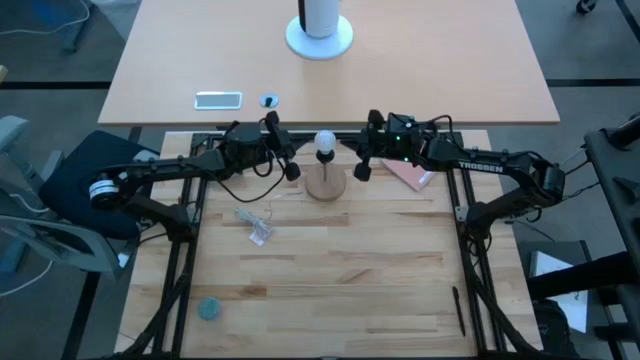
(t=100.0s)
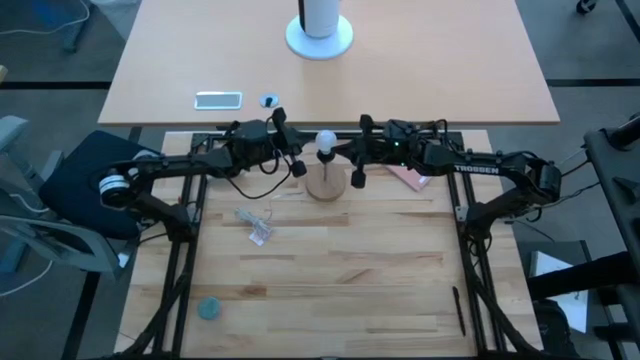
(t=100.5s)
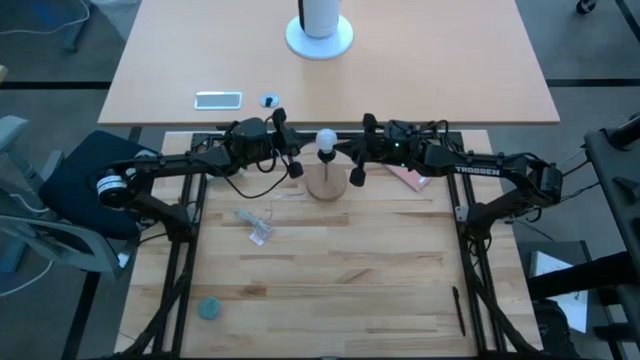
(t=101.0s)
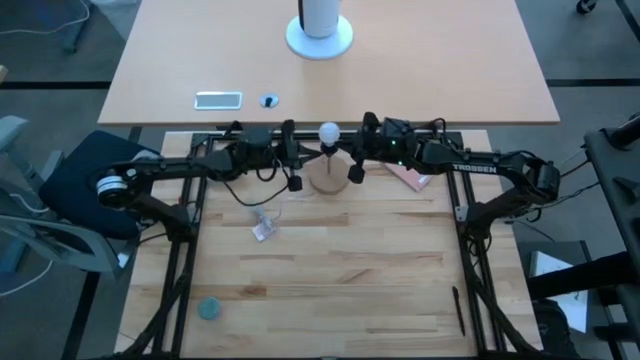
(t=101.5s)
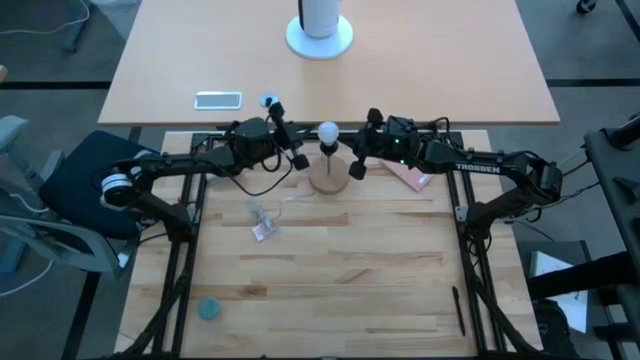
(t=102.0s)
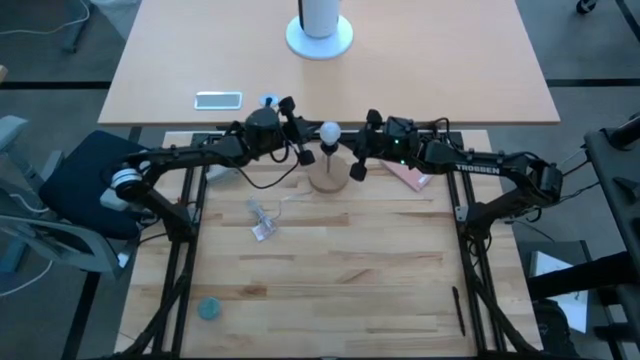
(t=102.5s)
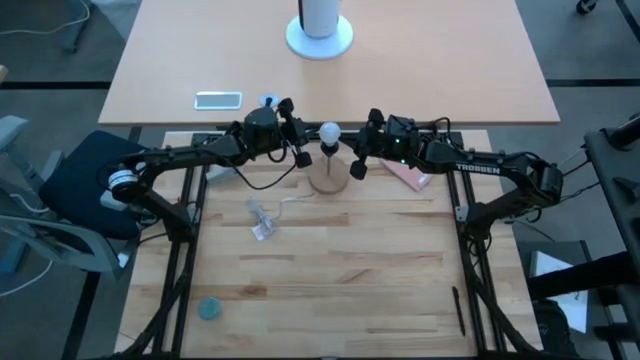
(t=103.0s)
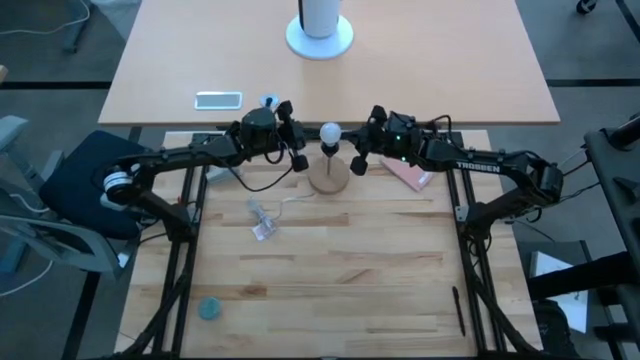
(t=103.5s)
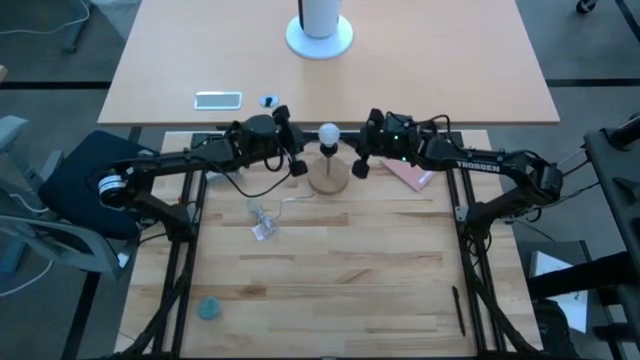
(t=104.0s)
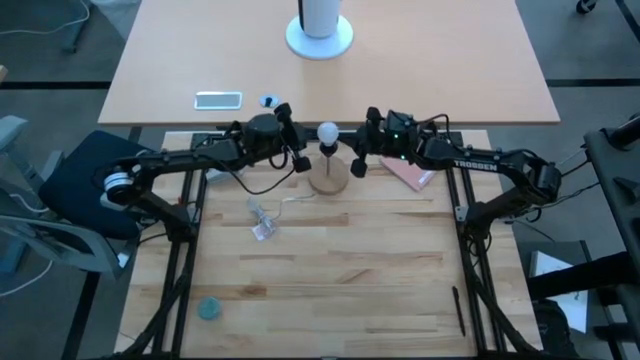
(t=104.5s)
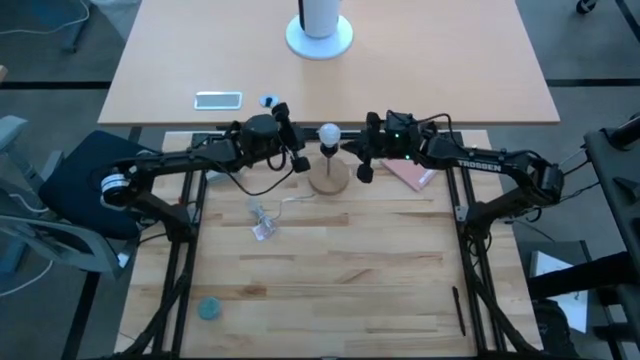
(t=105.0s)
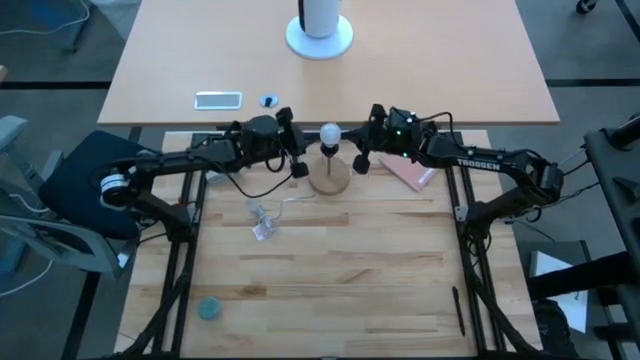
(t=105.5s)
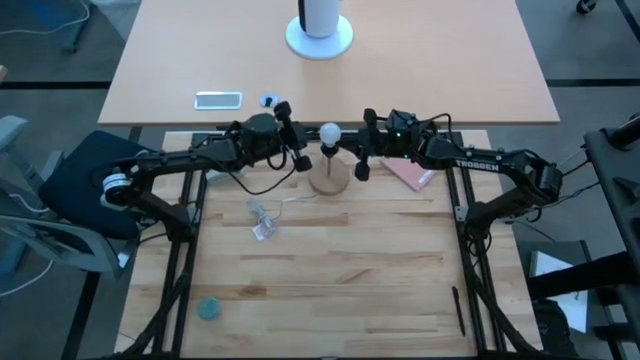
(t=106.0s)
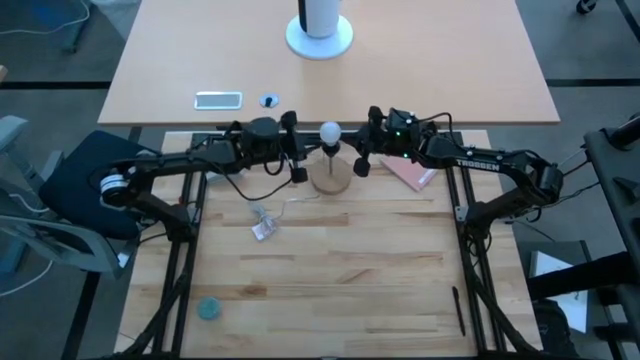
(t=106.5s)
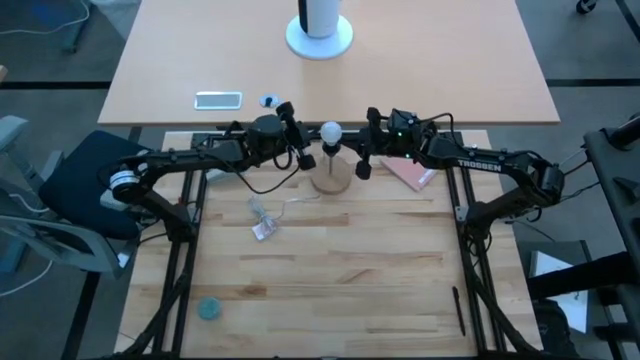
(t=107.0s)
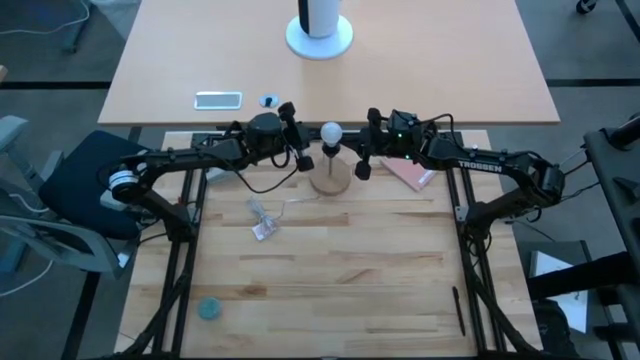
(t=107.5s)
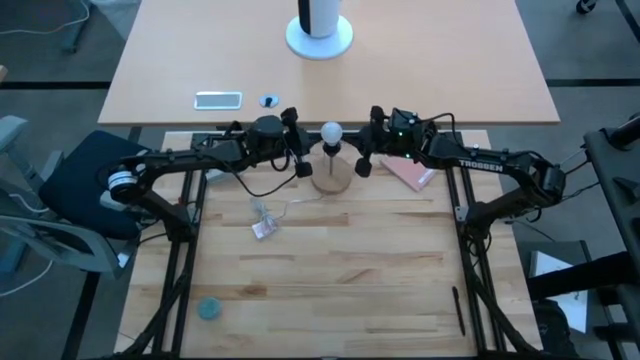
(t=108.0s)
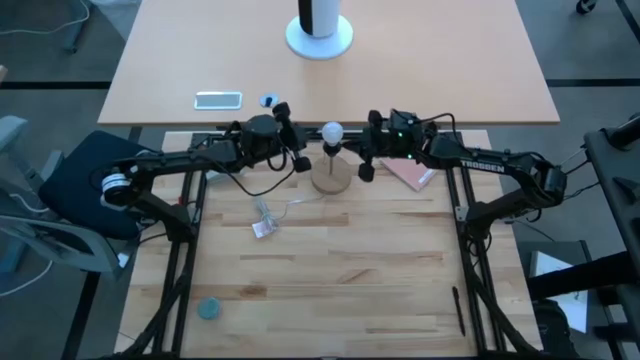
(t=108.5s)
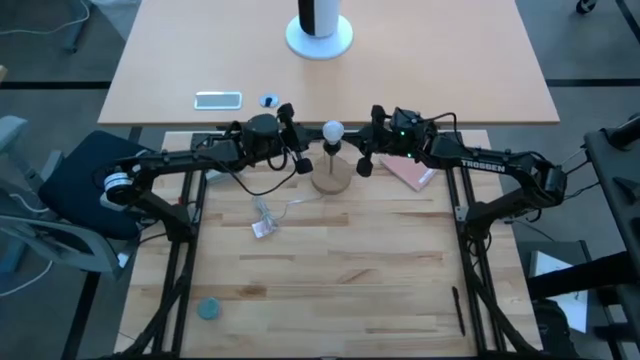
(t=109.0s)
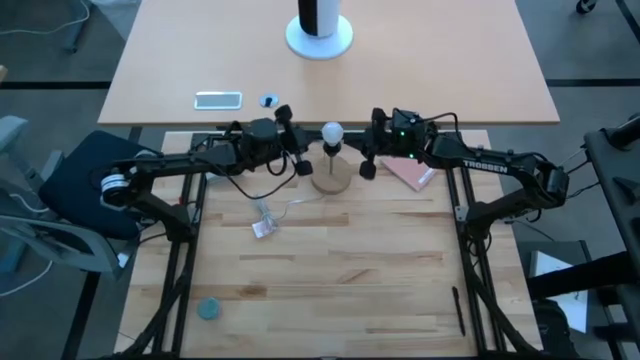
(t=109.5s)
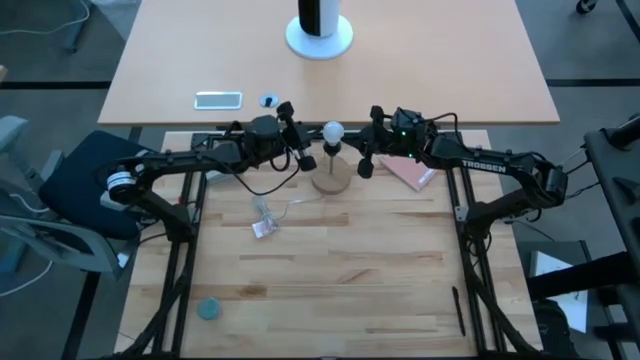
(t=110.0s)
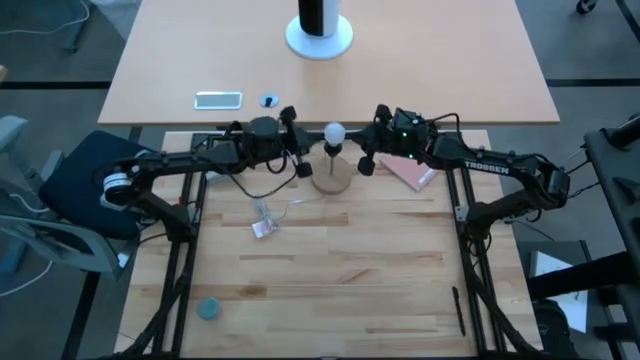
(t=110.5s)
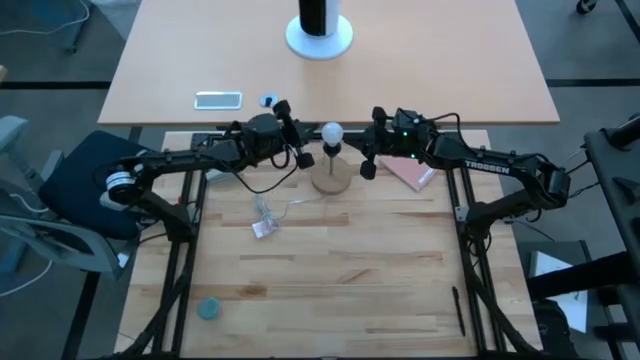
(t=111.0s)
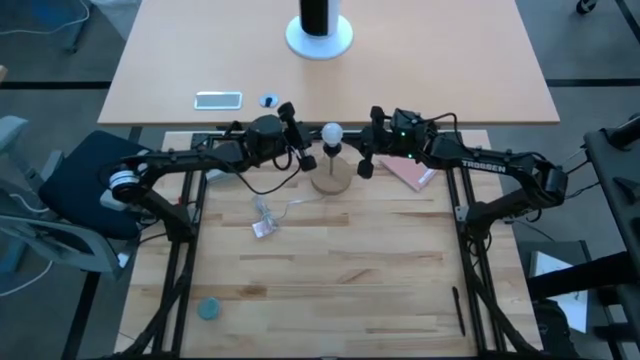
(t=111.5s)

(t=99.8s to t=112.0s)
Task: Screw lightbulb
Remove the lightbulb from the desk lamp

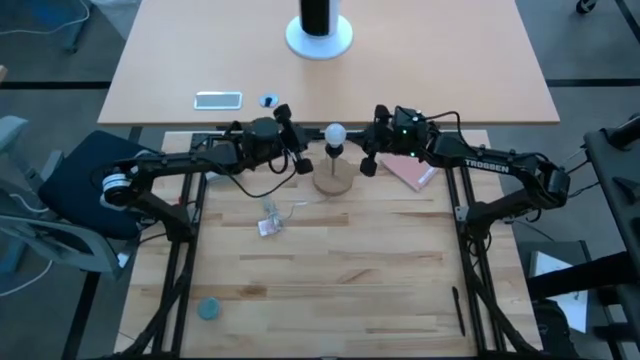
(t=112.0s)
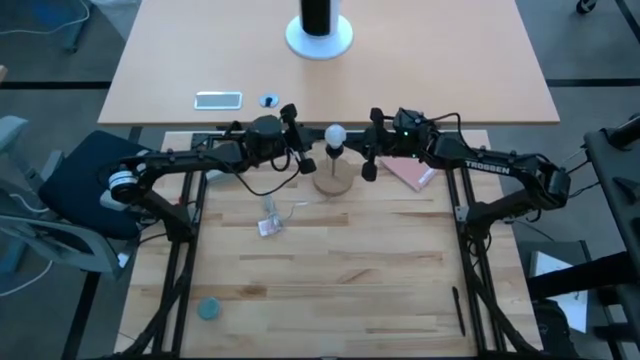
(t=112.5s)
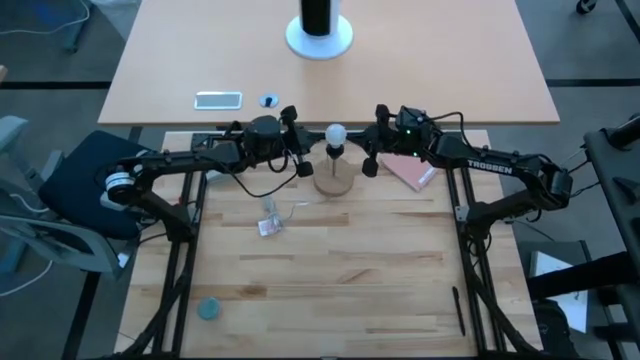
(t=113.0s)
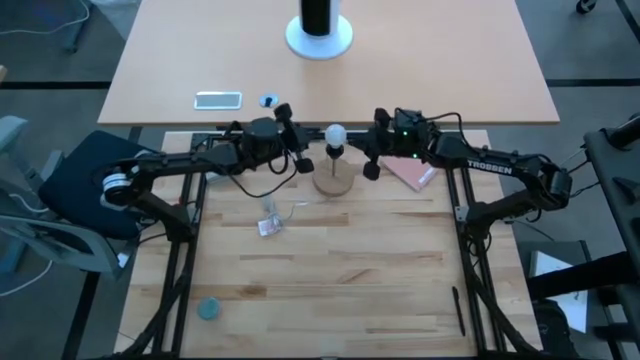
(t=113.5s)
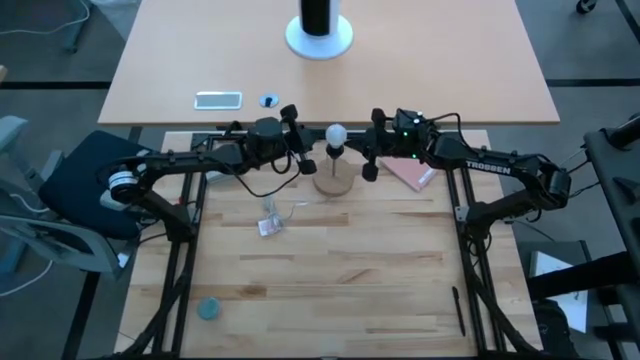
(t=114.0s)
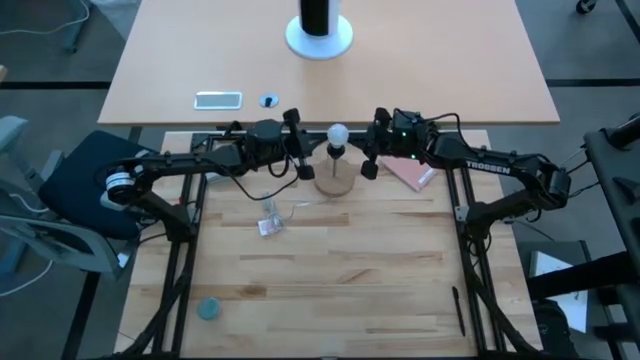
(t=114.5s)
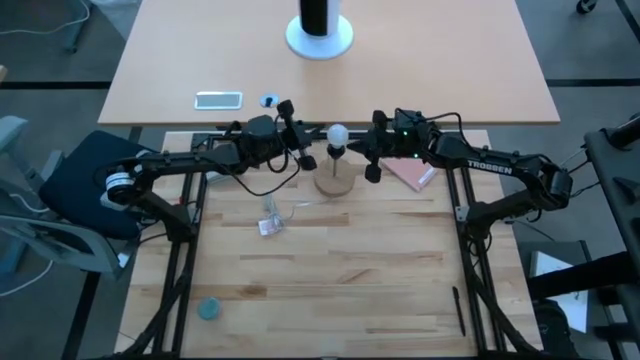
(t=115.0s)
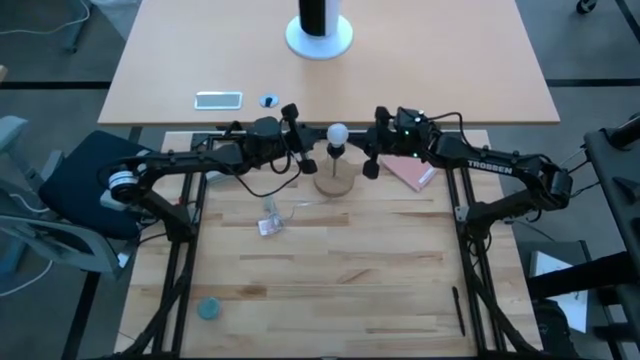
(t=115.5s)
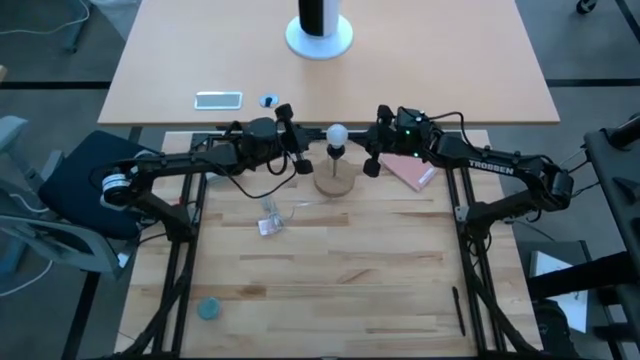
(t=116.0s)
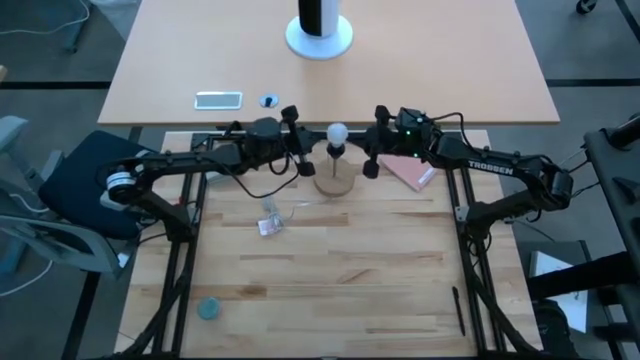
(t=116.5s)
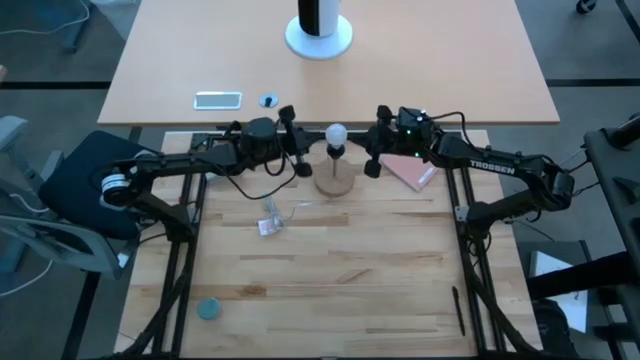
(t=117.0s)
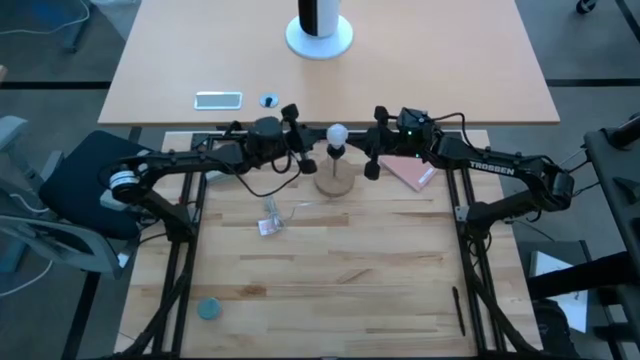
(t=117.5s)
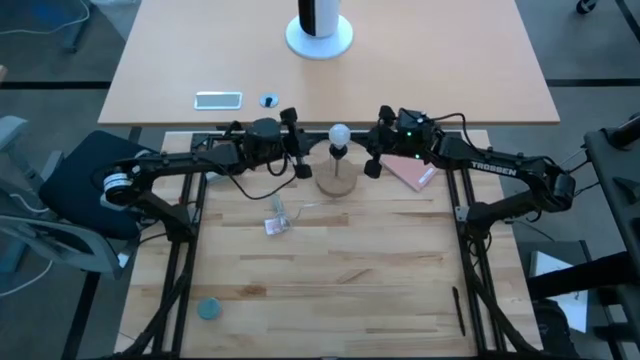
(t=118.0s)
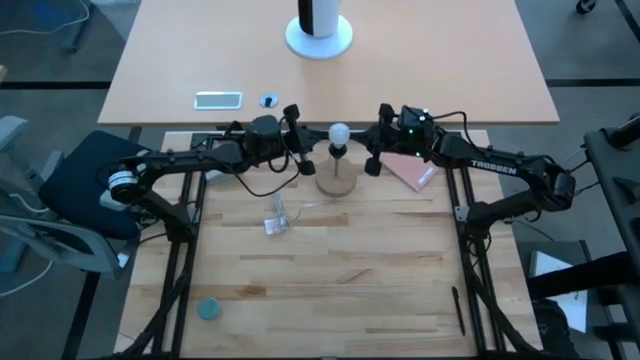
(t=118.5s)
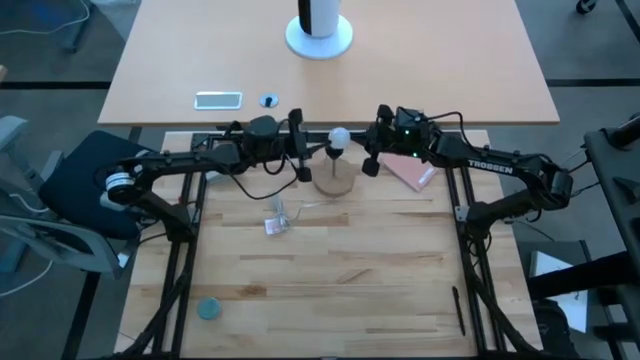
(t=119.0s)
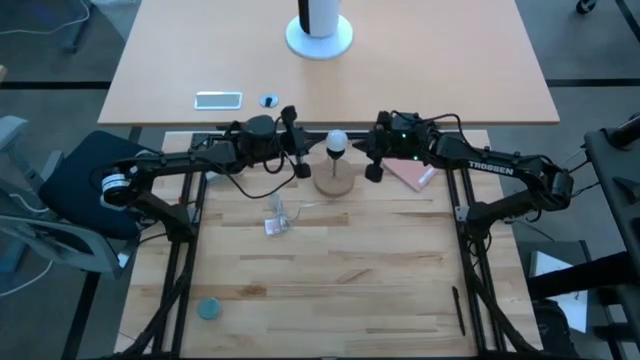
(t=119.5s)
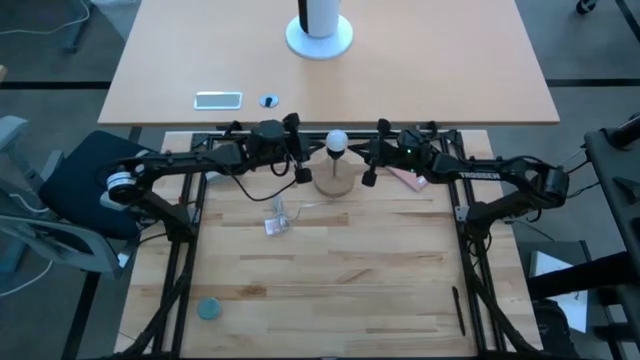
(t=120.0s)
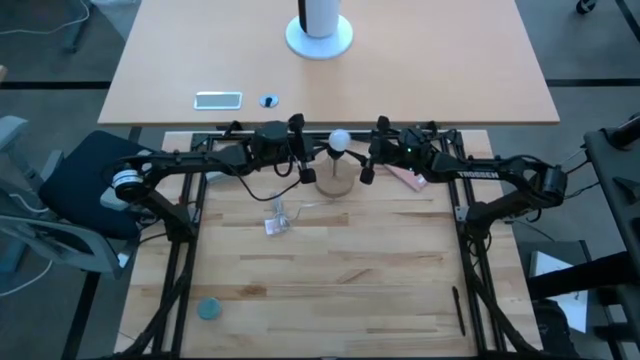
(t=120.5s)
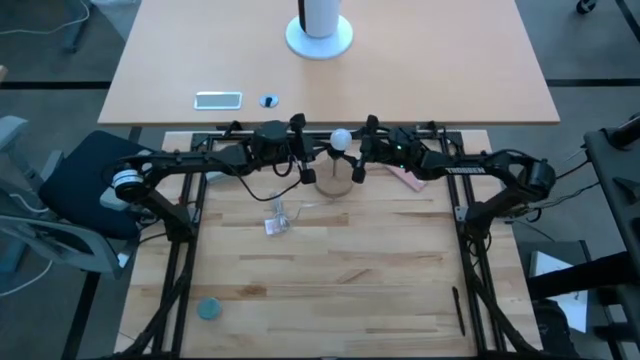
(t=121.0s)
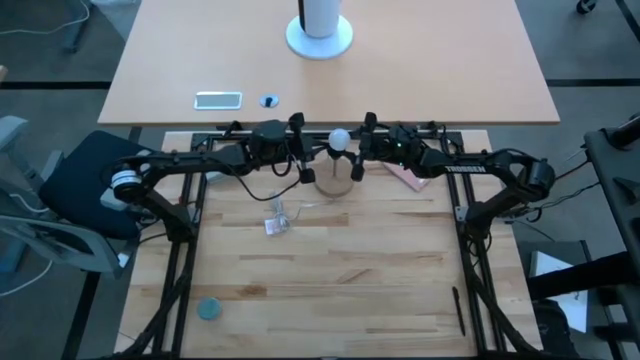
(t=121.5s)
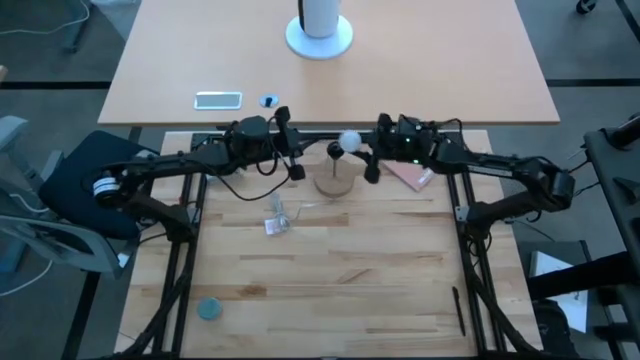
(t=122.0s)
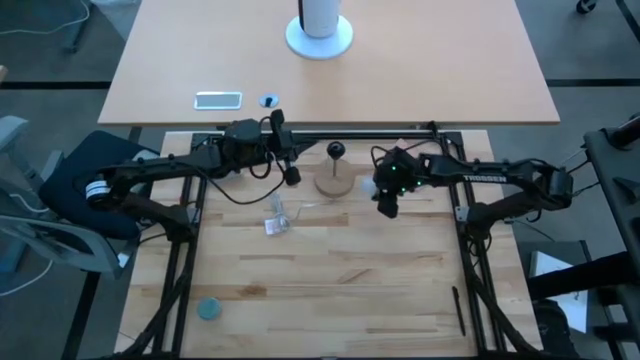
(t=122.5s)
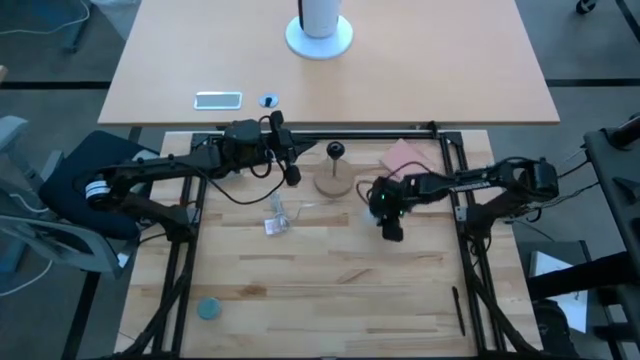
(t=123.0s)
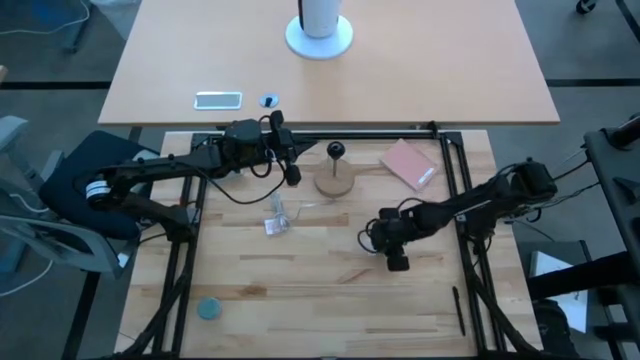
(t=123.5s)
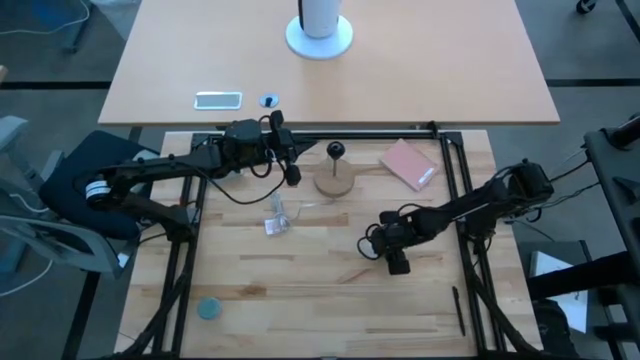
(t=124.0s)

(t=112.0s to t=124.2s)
Remove the lightbulb from the desk lamp
